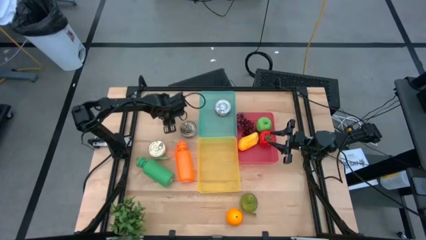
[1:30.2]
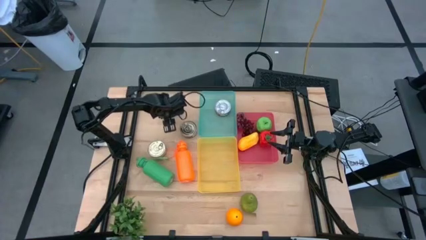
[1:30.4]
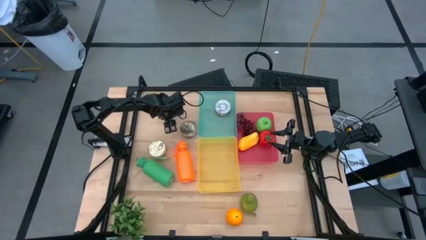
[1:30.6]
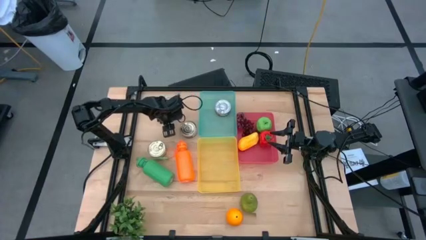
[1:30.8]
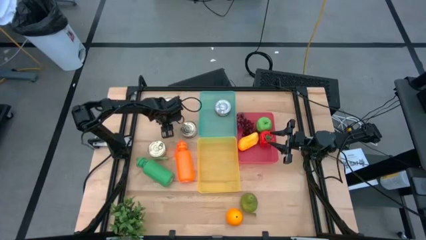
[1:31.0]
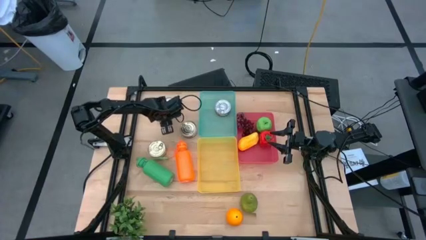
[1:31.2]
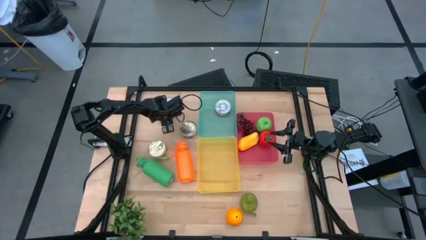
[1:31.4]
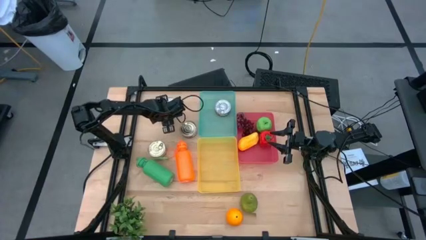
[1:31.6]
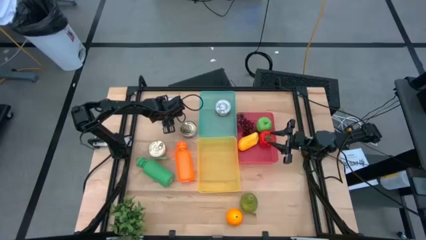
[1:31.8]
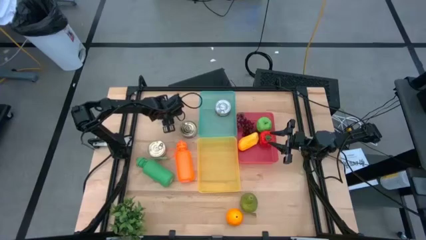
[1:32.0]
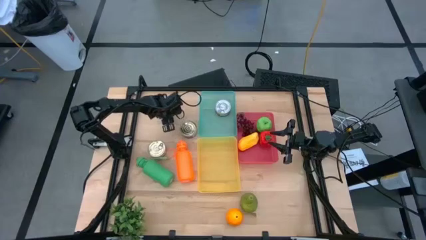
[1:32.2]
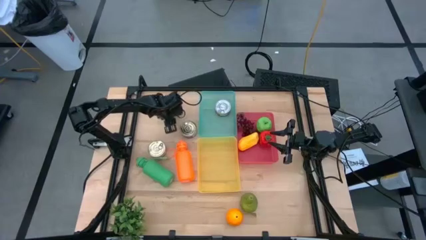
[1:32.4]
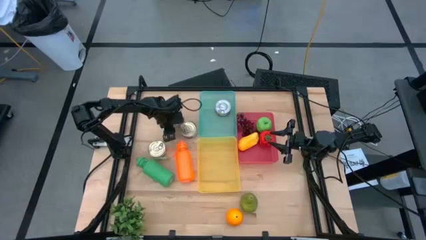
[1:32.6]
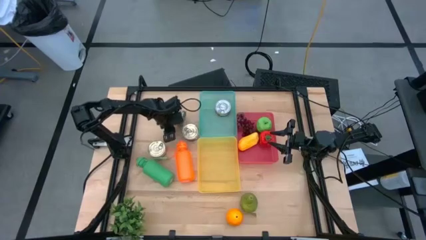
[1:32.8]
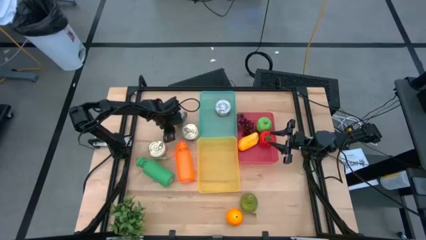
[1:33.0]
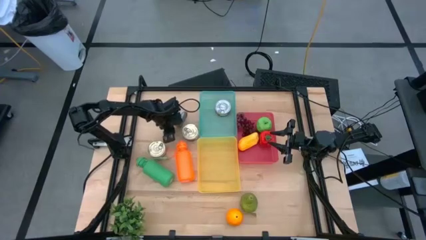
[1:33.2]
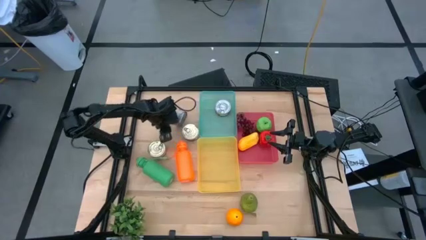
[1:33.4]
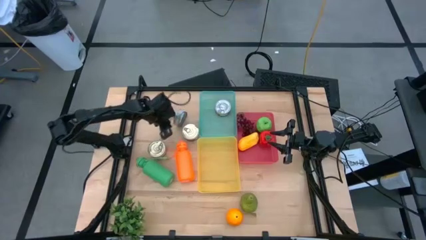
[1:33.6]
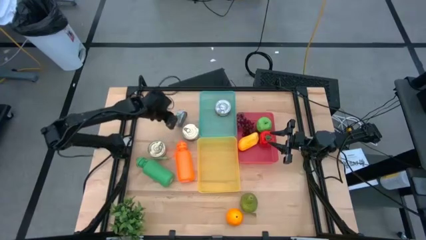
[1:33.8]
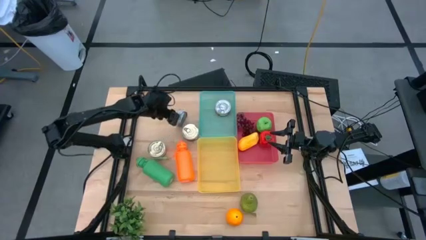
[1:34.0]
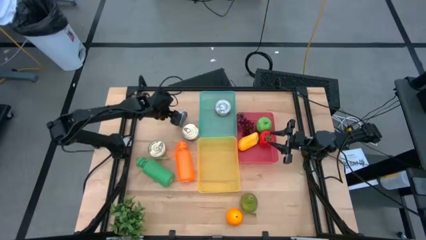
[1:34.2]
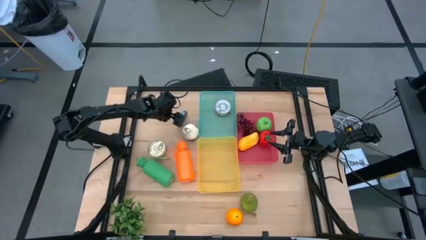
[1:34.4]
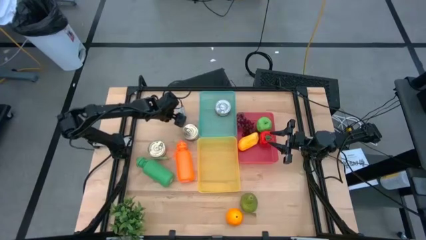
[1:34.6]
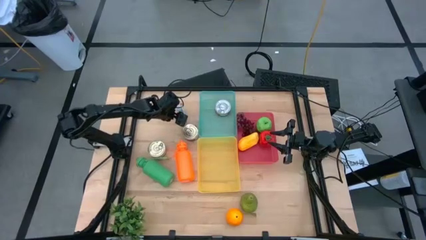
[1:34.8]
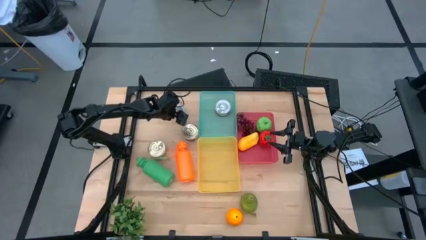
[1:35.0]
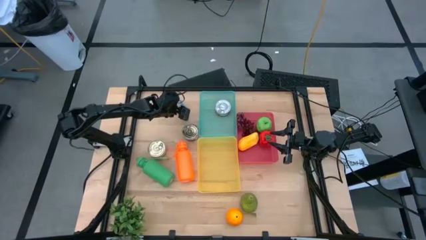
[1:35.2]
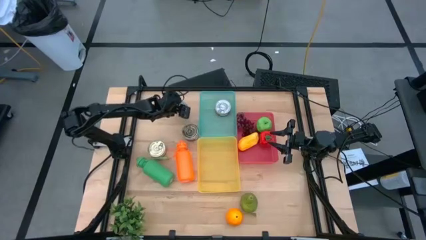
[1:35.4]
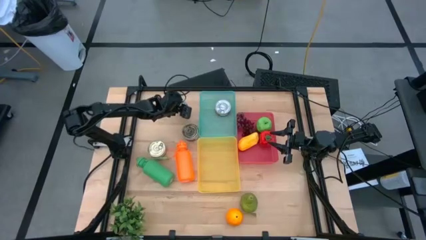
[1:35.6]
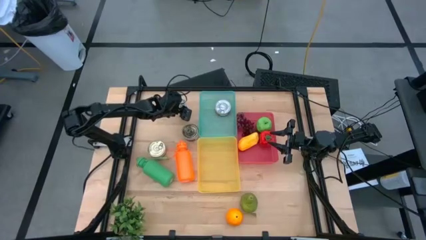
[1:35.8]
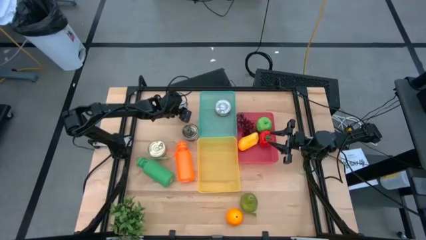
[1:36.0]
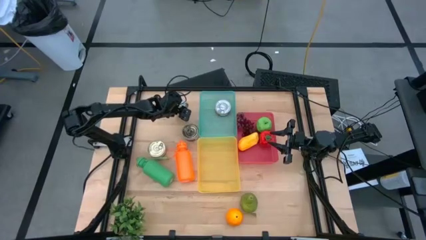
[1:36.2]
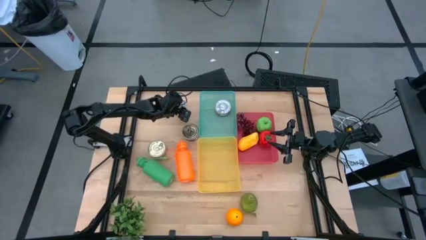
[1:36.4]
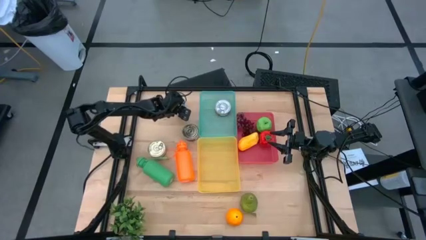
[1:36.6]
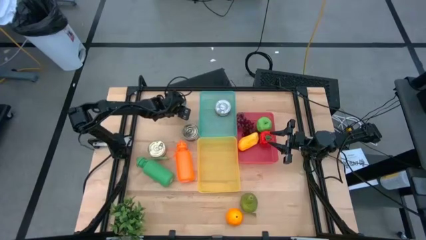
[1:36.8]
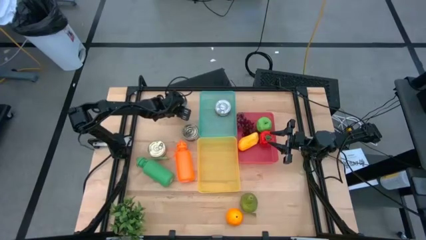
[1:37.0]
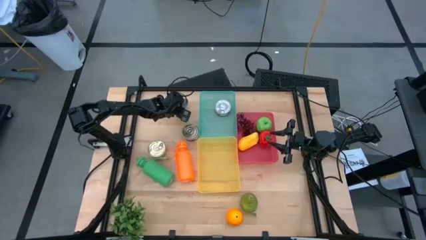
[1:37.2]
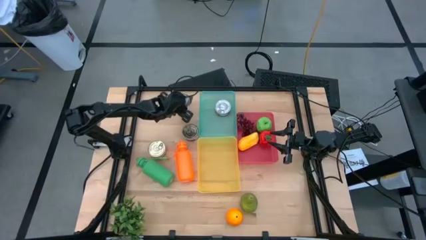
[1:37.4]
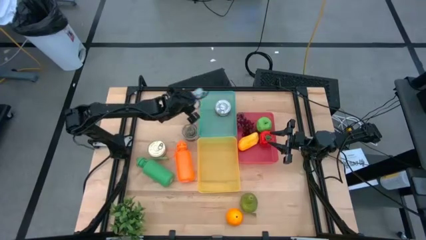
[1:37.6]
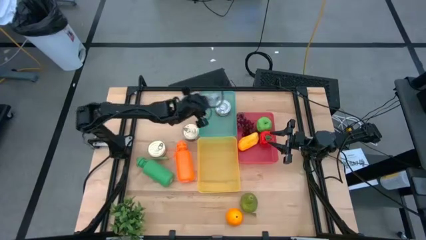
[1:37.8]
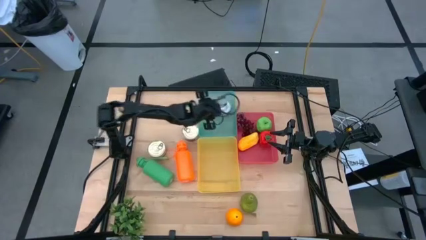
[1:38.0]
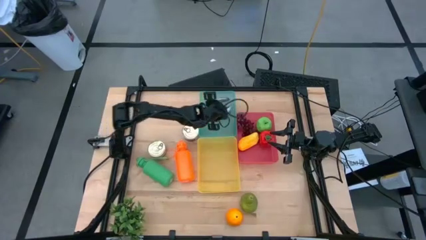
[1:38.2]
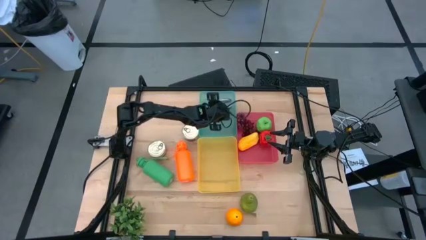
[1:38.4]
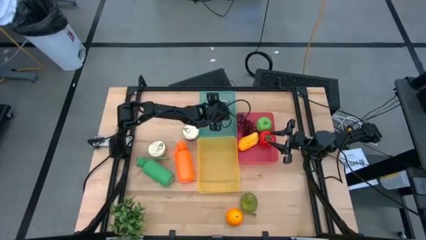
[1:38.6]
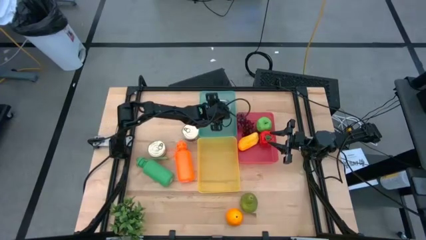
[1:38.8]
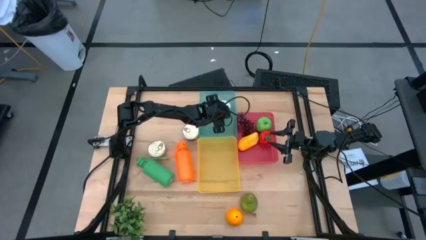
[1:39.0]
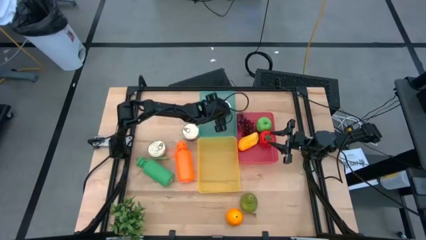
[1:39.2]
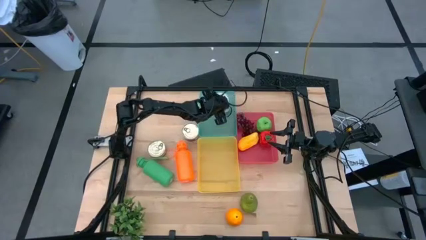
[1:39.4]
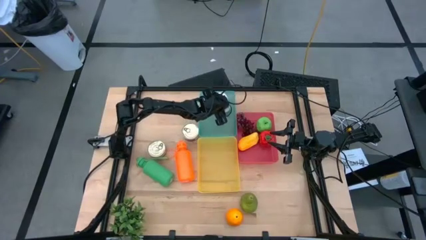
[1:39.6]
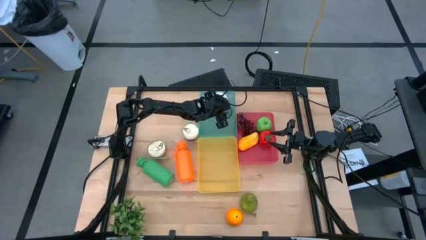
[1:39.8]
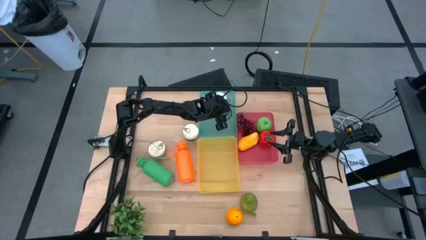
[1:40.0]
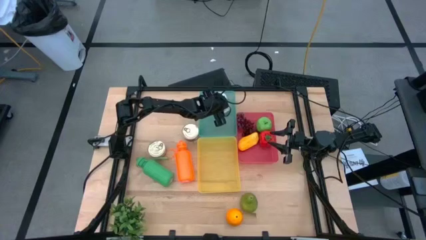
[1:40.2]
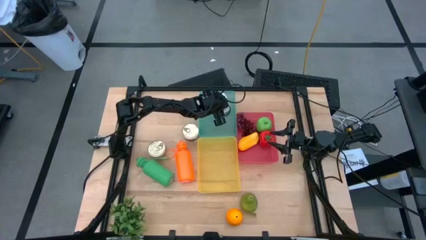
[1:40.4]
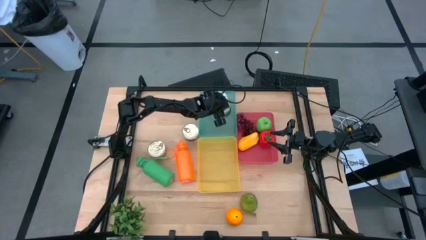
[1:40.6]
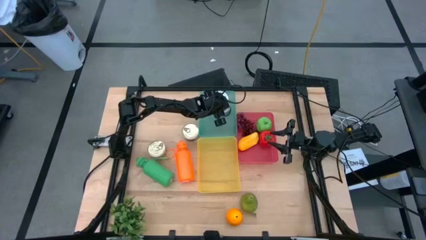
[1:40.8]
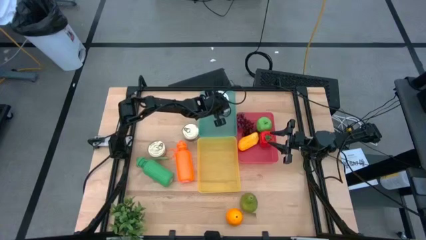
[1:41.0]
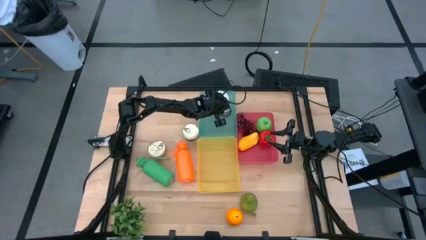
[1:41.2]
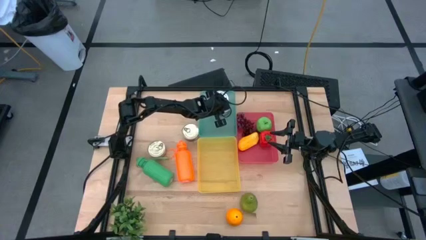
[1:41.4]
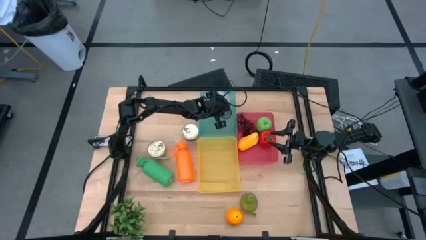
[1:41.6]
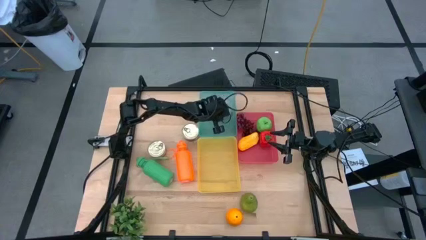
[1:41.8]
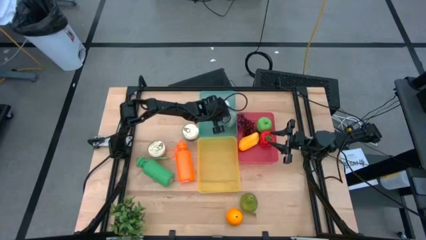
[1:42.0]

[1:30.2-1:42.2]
Task: Pick & Place Food Item
Put the green tuna into the light blue bin

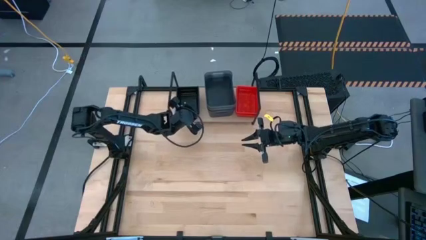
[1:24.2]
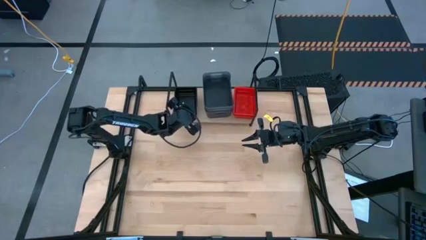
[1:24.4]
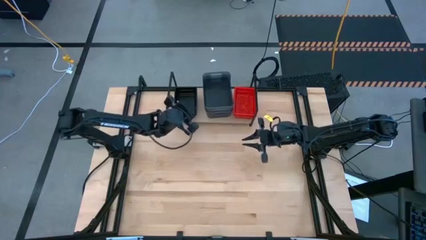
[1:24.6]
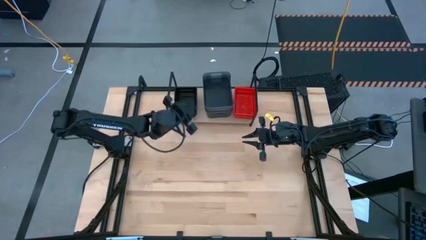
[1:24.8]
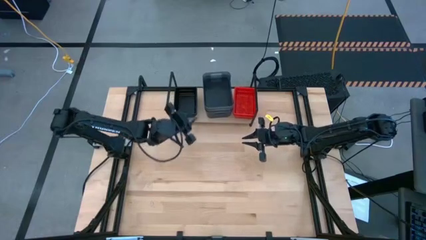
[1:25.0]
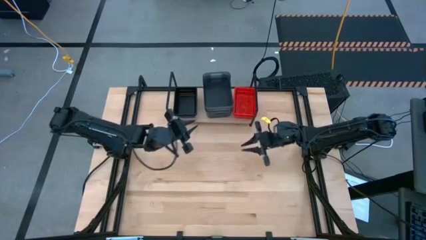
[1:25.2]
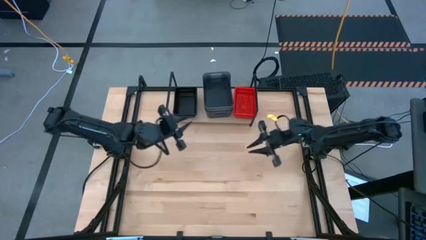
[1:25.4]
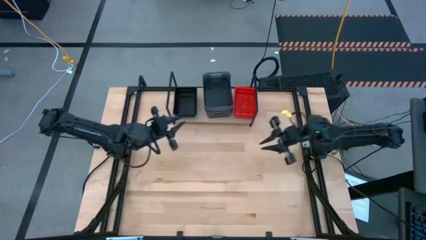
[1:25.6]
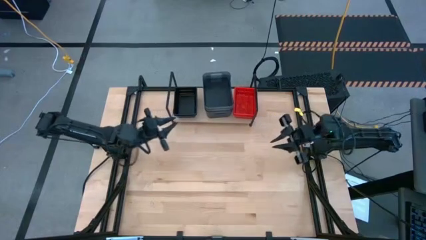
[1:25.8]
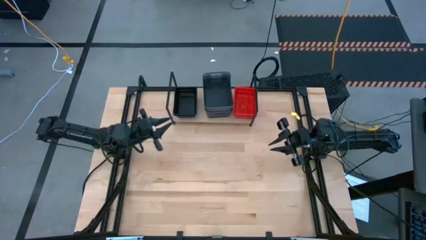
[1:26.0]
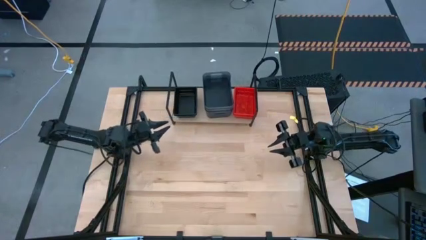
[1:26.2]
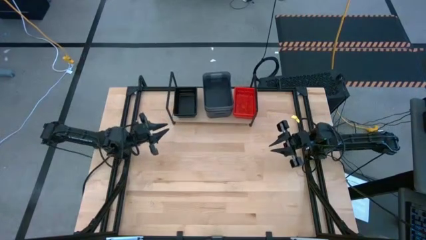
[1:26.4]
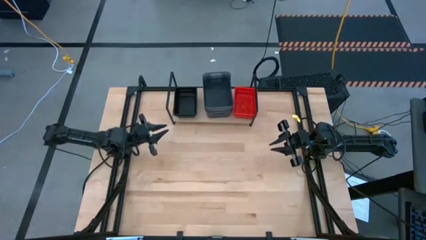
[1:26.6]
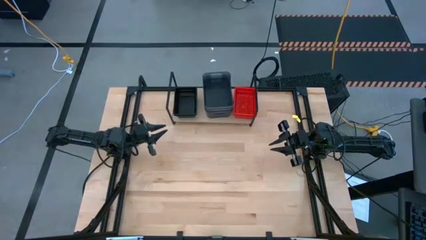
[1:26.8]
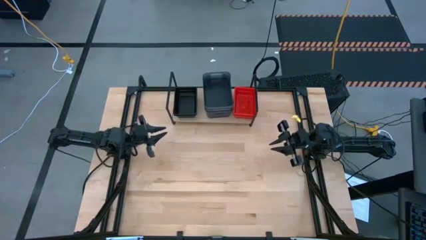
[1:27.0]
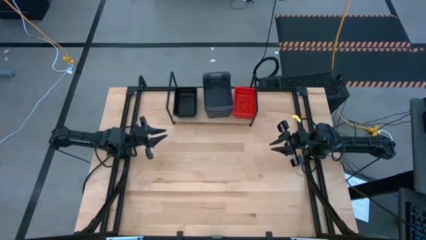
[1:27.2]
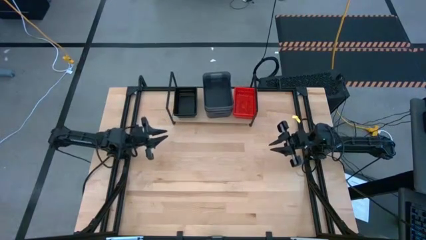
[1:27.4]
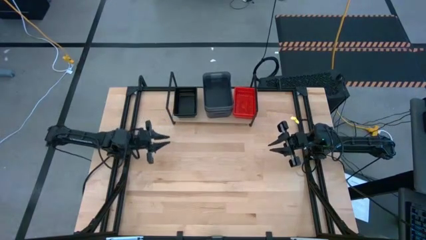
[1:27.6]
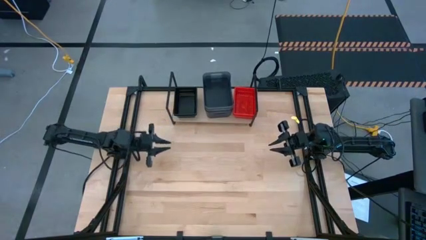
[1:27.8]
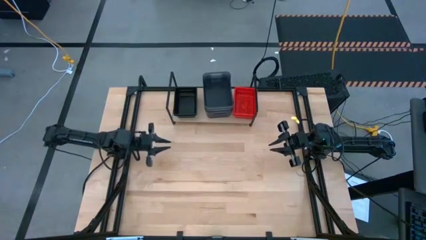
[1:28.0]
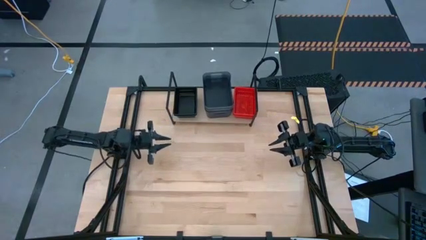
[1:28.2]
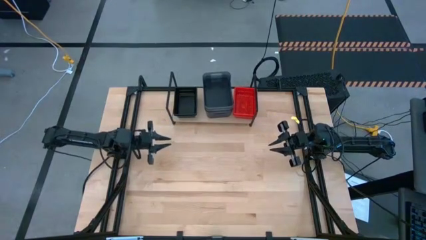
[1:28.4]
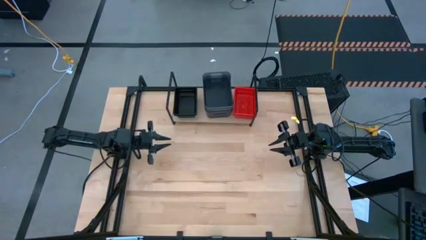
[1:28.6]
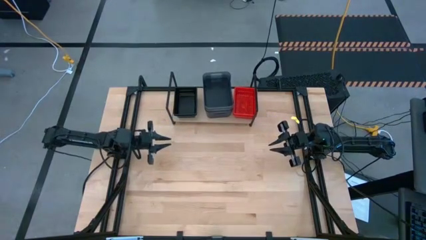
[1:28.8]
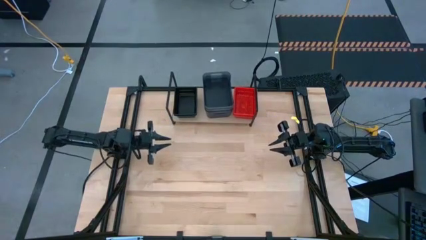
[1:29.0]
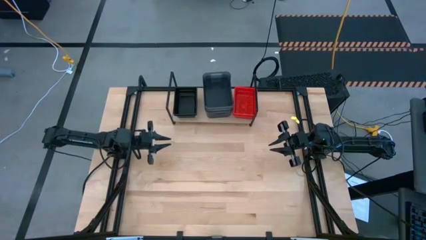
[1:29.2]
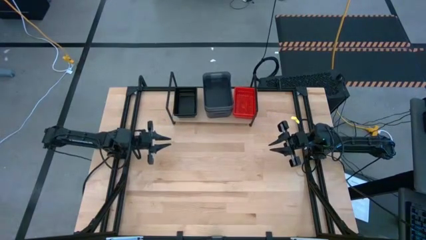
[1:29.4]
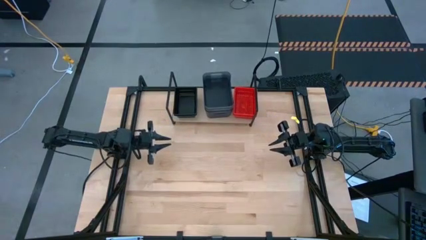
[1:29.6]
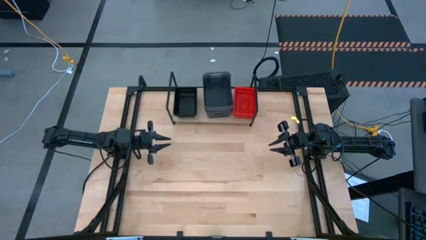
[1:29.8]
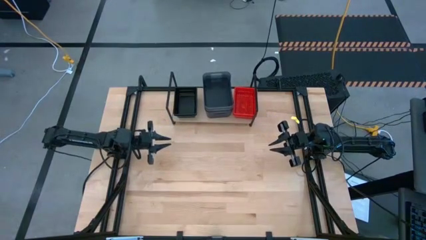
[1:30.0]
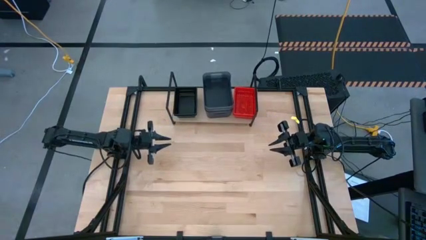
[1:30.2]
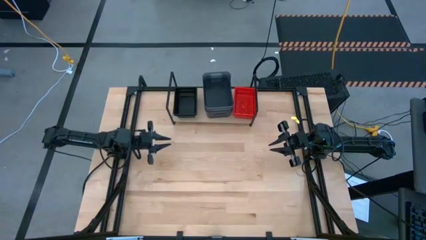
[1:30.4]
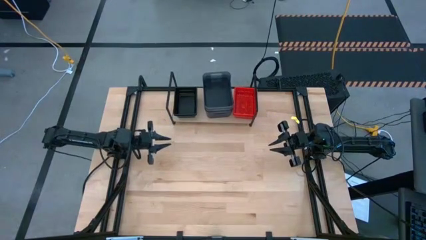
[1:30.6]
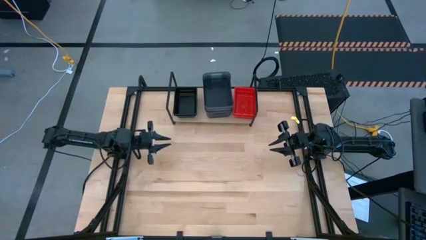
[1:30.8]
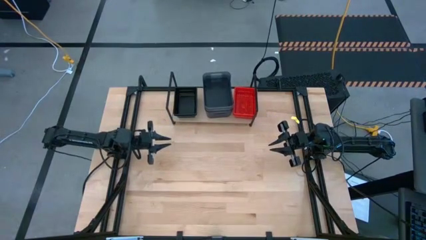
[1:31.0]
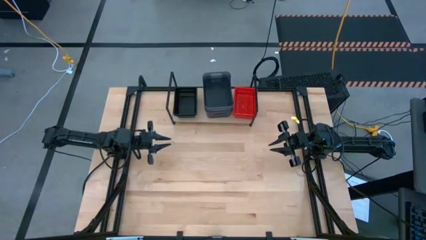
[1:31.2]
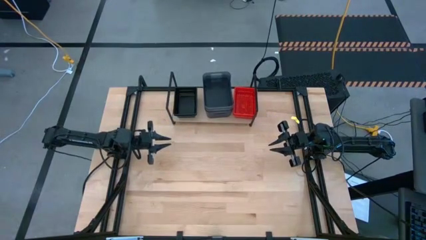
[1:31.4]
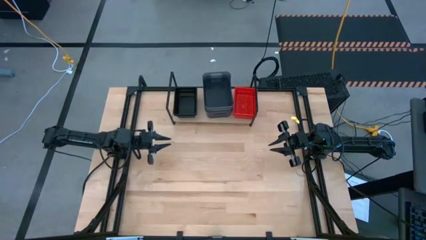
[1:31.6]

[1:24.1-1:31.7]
Task: Stack baskets on shelf by color
Return to Home Position
